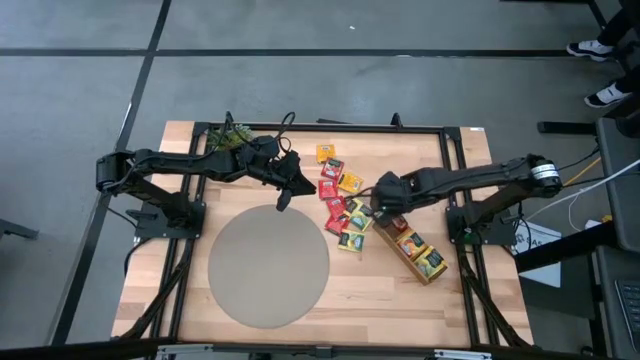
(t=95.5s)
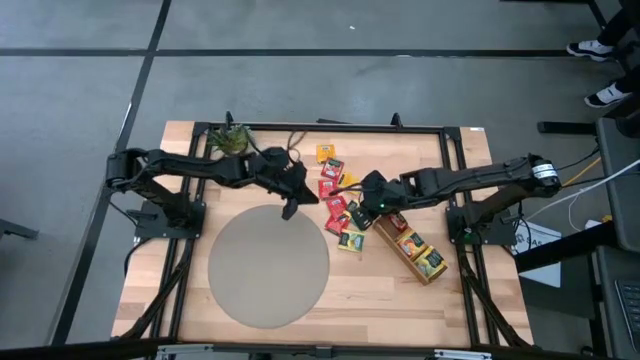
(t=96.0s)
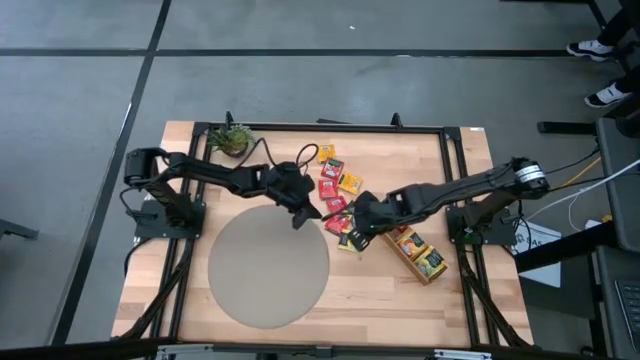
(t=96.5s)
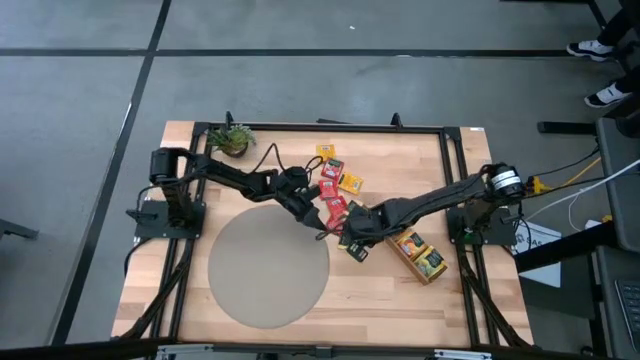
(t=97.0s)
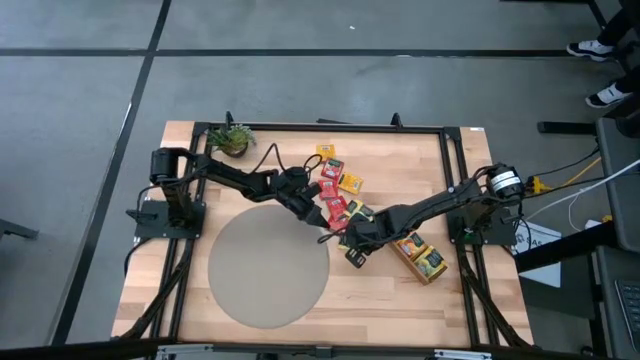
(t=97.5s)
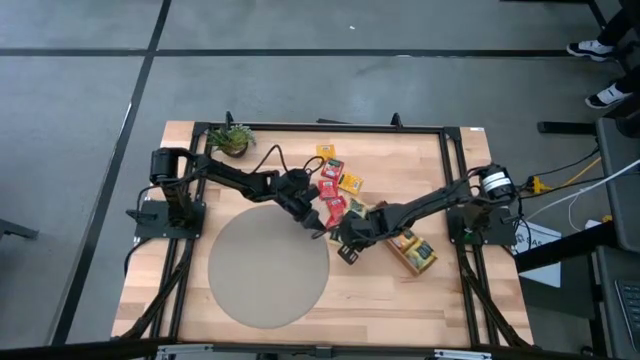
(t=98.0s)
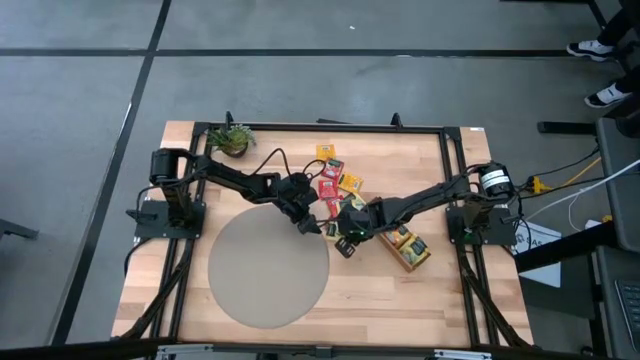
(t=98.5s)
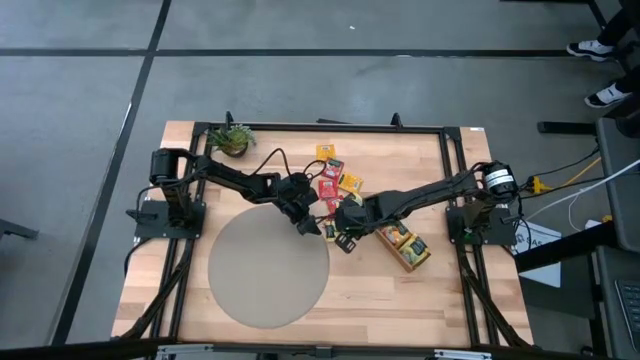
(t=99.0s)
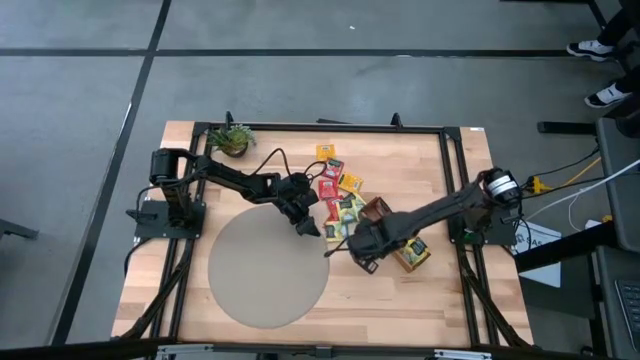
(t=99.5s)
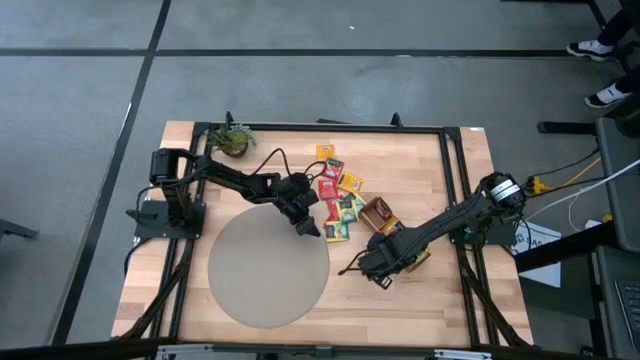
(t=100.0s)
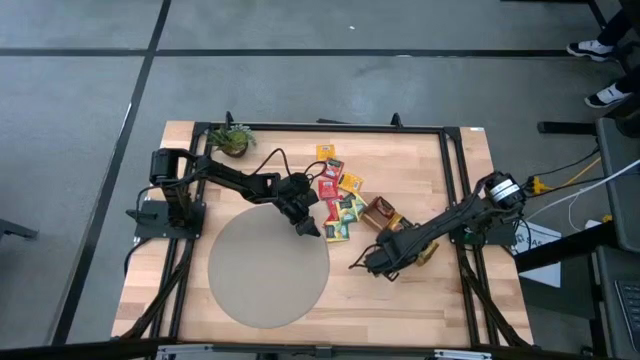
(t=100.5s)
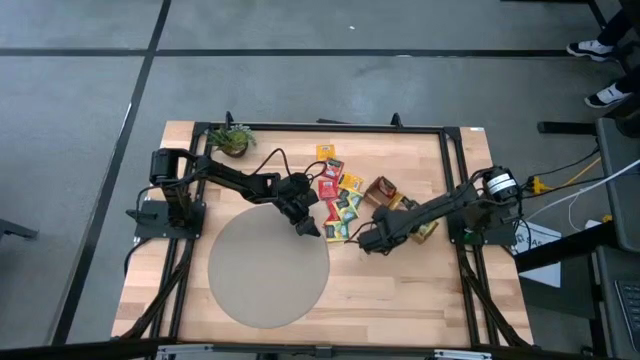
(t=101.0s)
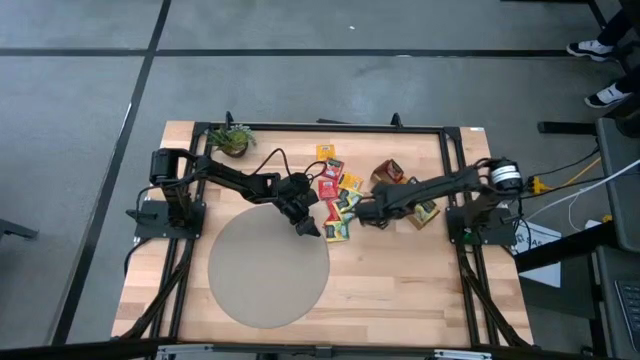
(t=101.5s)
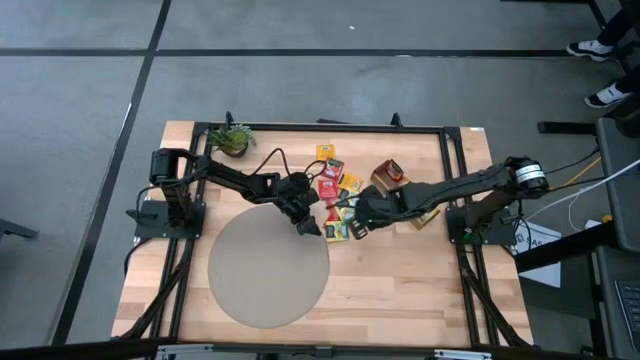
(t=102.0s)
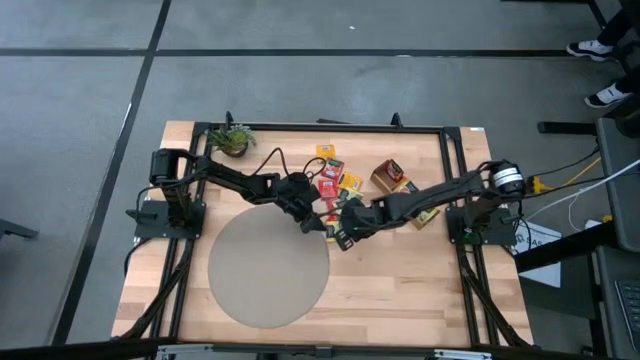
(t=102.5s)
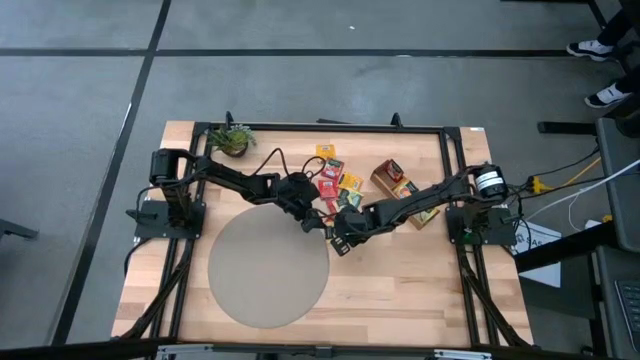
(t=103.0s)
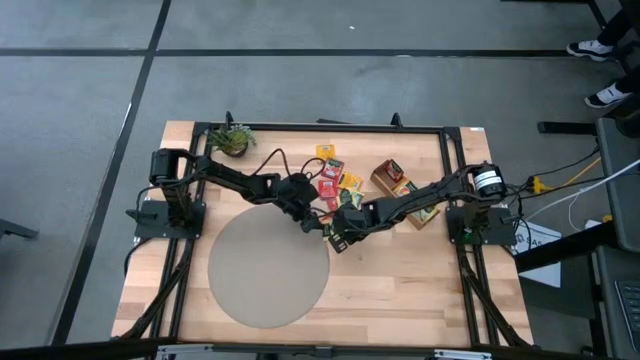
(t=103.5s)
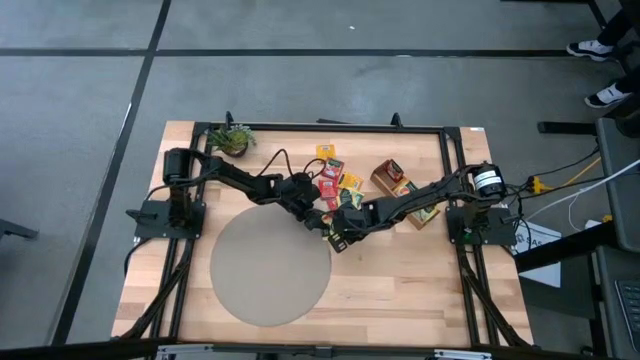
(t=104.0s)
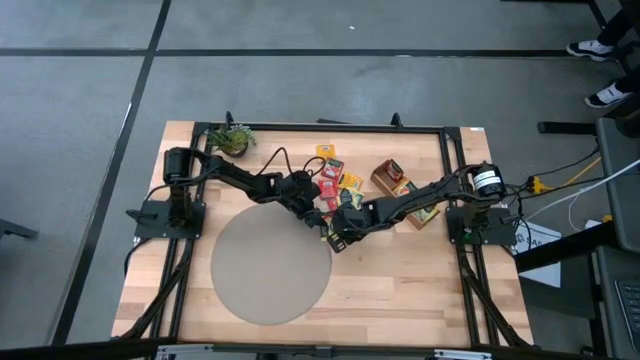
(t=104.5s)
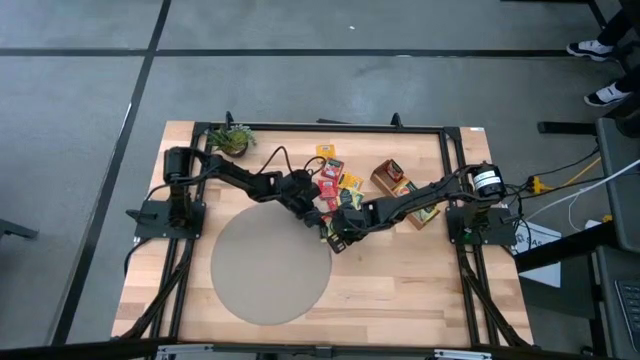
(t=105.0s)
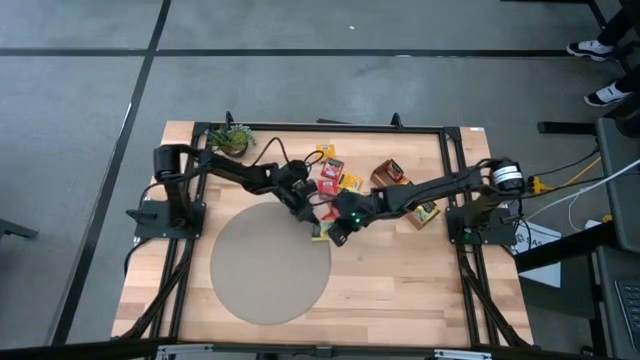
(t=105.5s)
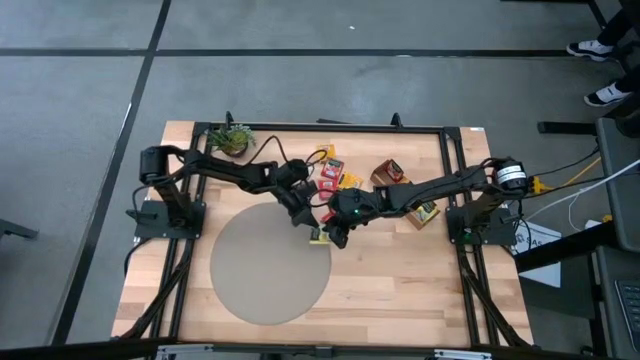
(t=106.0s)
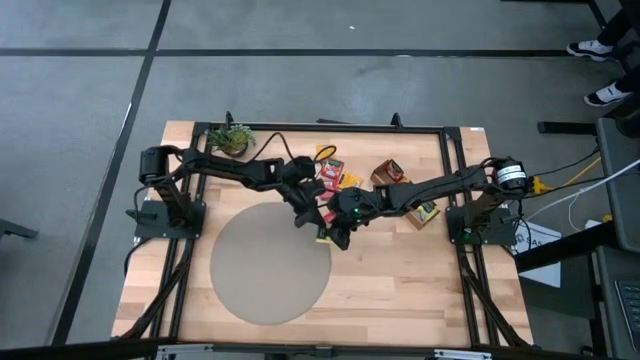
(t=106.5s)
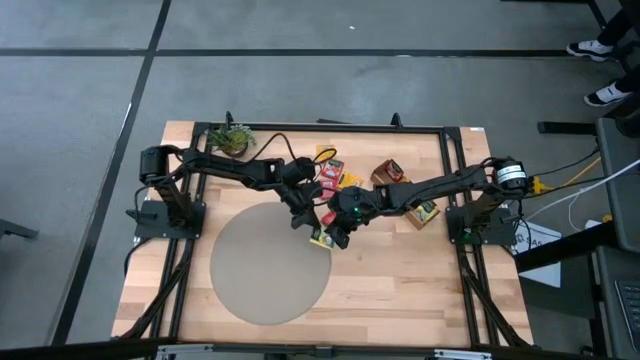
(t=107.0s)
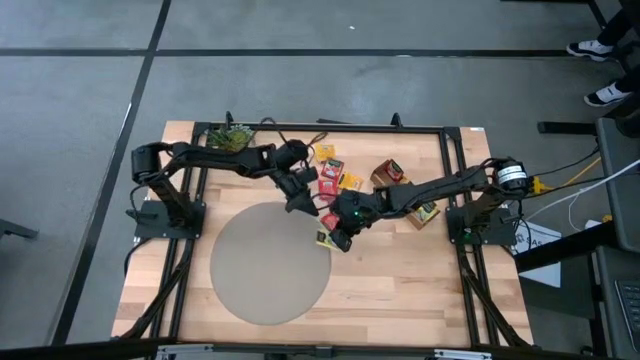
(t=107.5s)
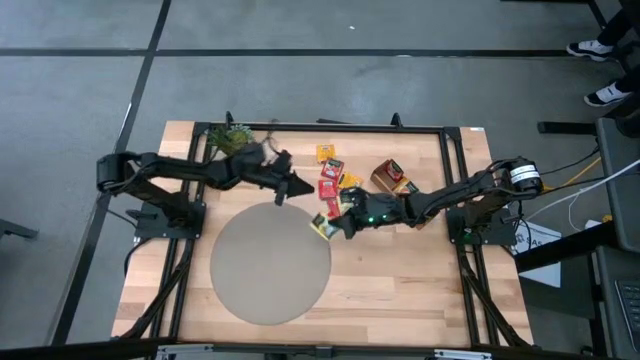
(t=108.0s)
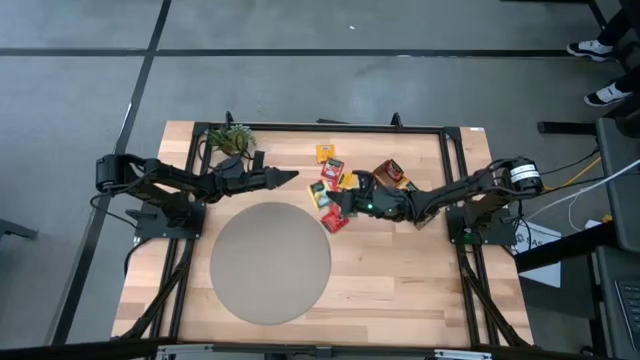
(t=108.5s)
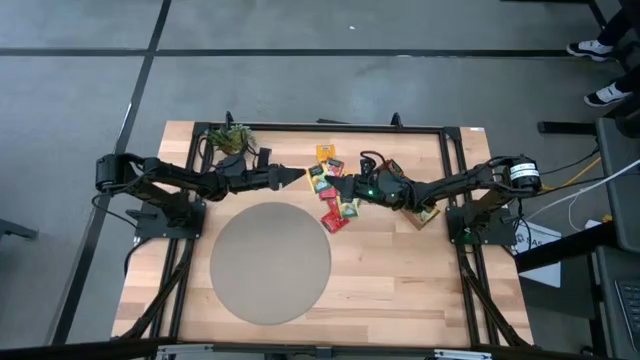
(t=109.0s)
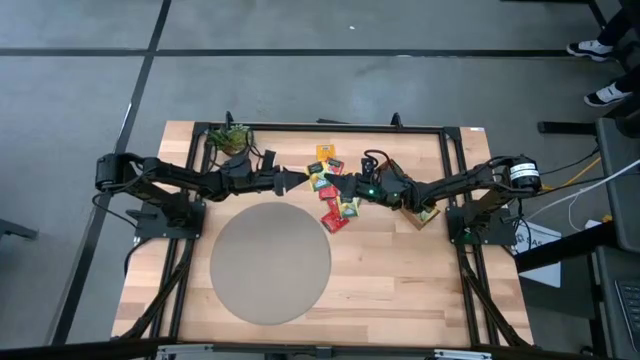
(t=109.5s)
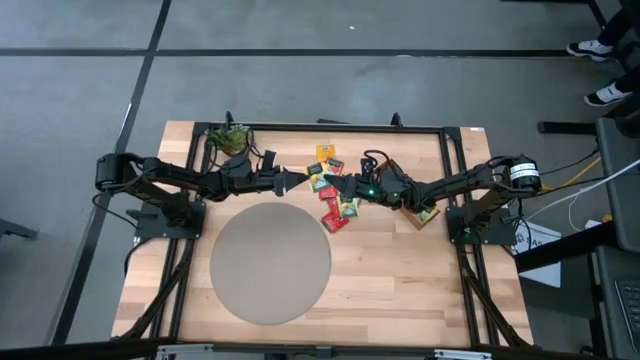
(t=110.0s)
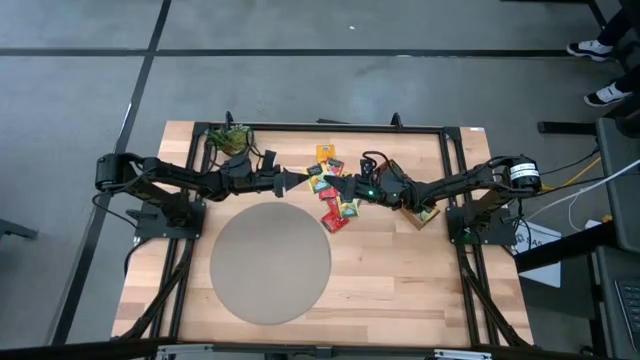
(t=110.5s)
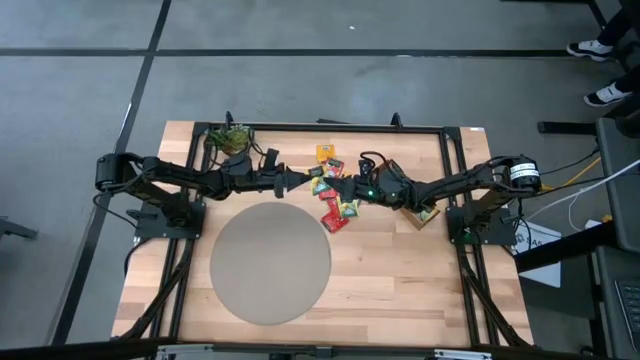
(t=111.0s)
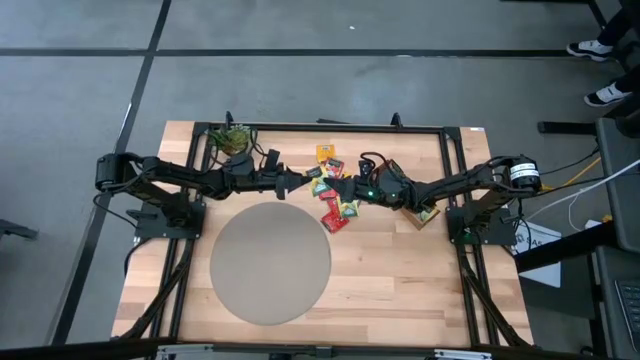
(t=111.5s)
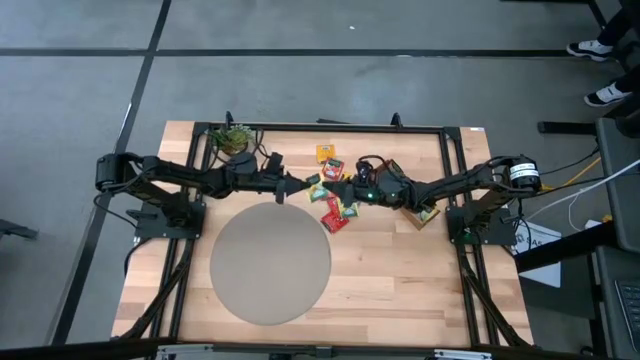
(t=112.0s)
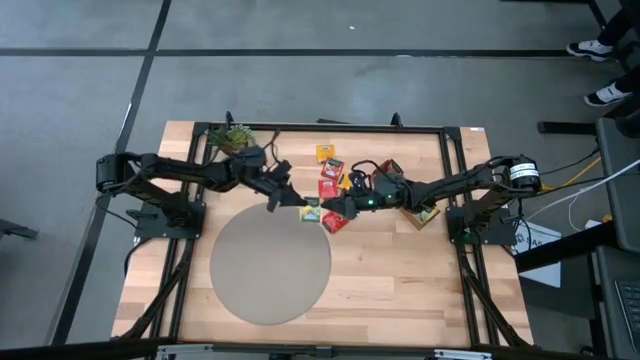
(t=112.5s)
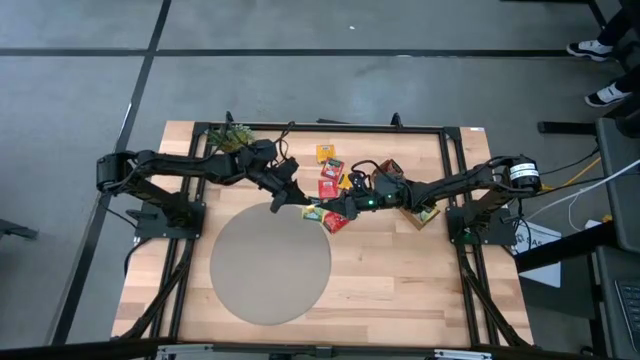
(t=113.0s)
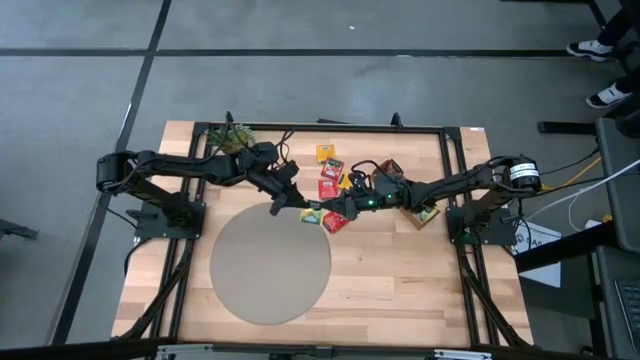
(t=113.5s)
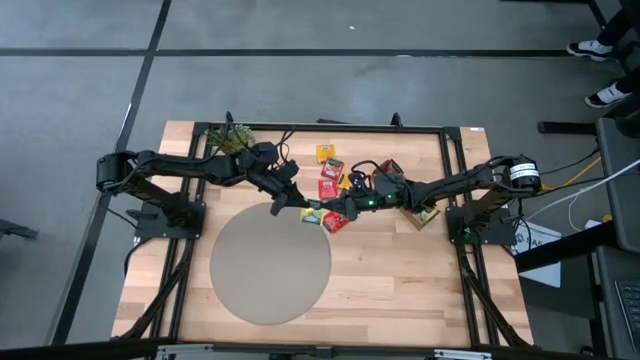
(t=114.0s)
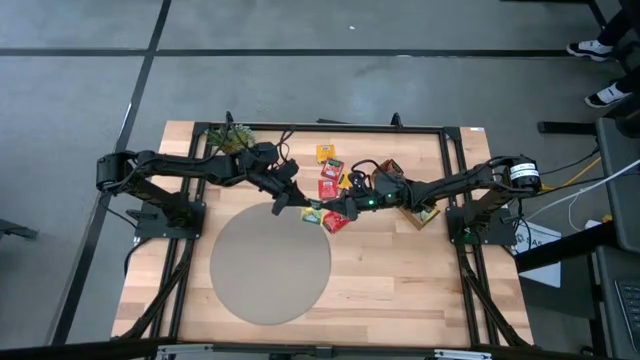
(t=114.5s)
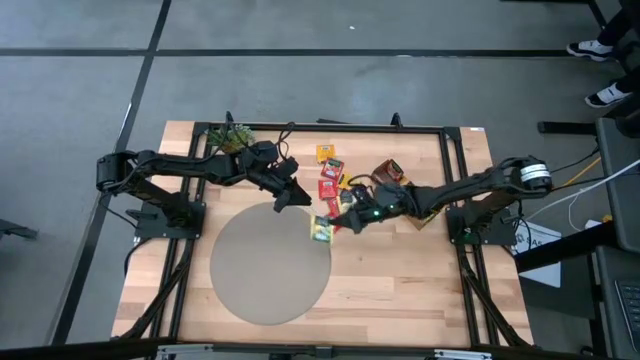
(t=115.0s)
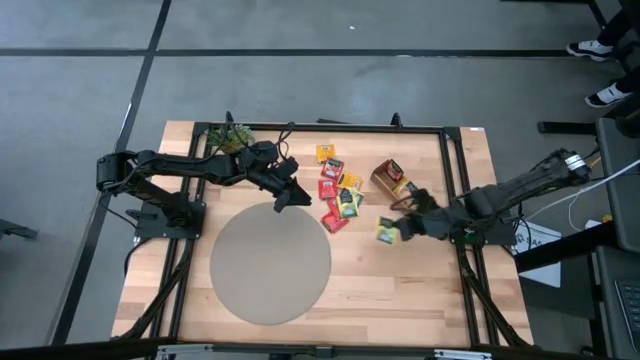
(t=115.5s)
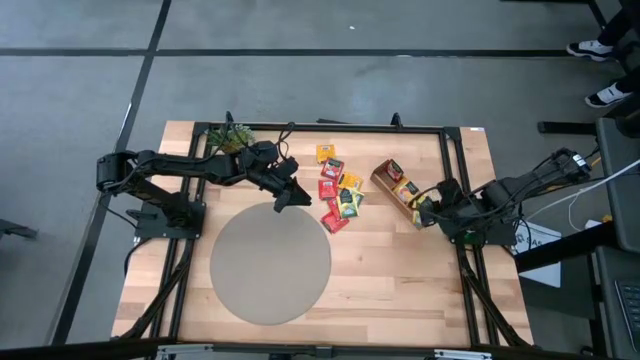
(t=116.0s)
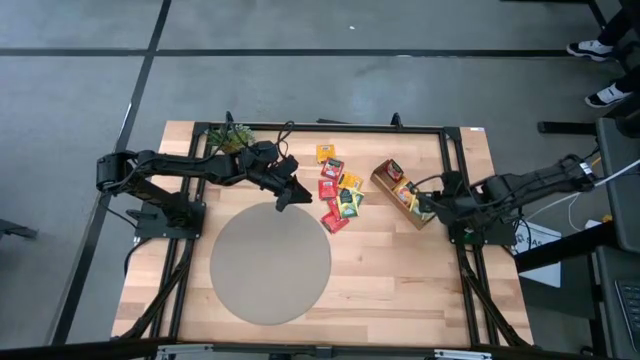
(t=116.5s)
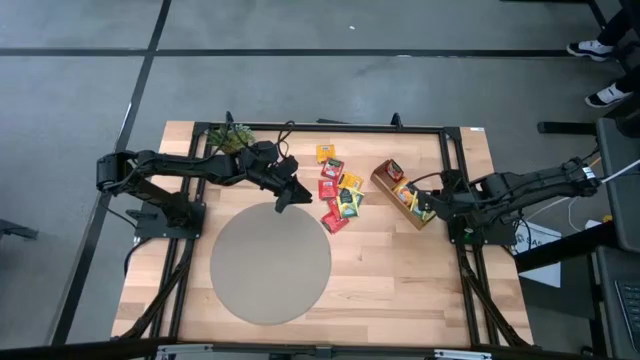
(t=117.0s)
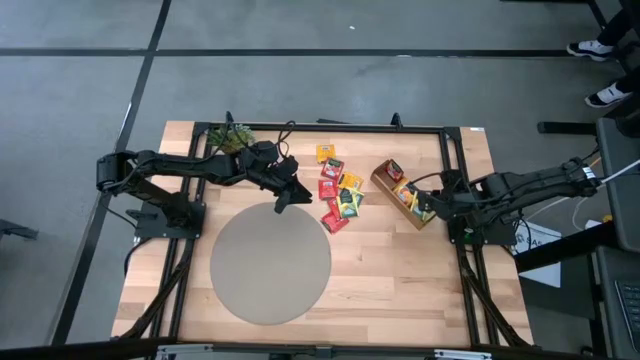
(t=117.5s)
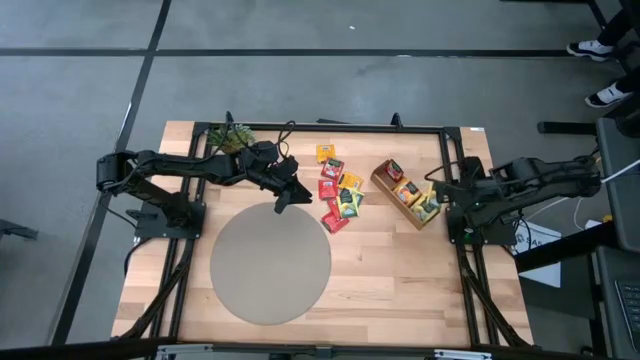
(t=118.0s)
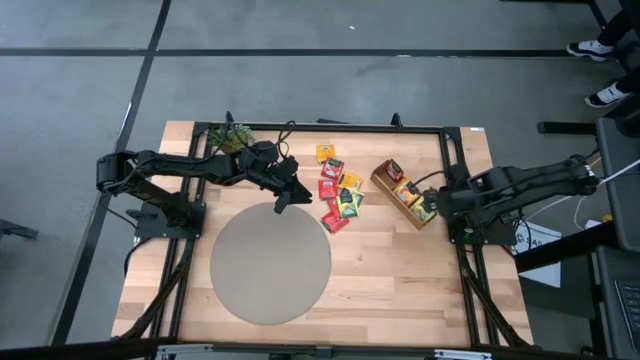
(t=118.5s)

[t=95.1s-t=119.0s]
Task: Pick & Place Tea
Put the yellow tea bag into the bottom section of the wooden organizer
